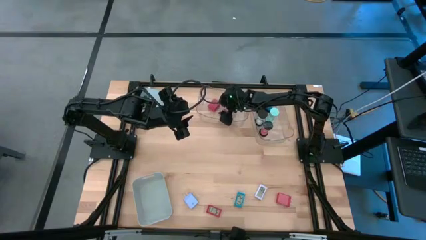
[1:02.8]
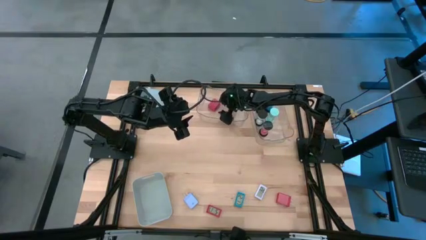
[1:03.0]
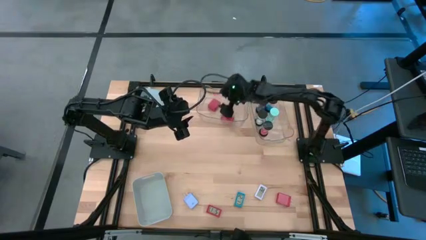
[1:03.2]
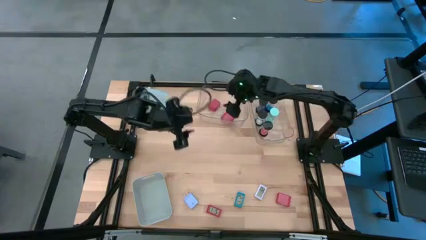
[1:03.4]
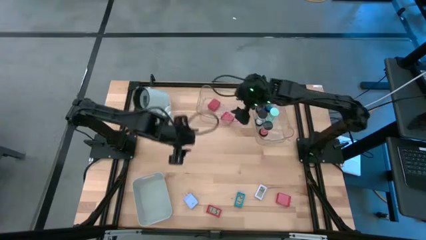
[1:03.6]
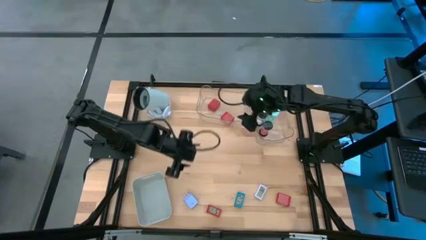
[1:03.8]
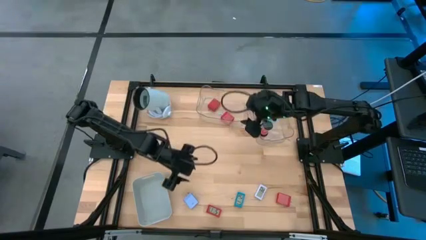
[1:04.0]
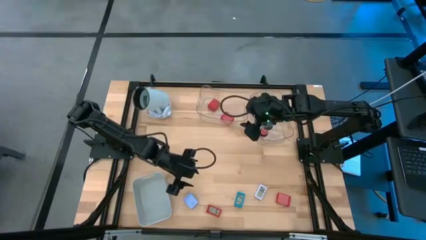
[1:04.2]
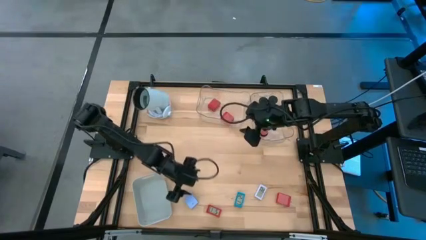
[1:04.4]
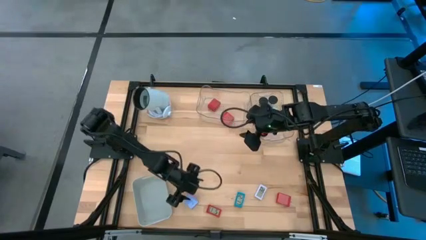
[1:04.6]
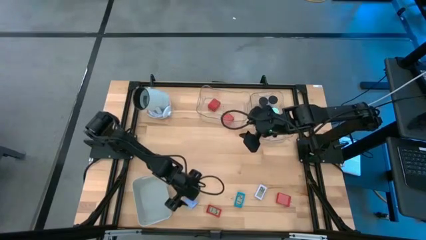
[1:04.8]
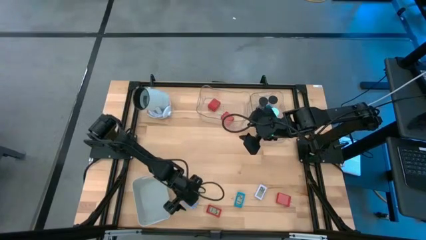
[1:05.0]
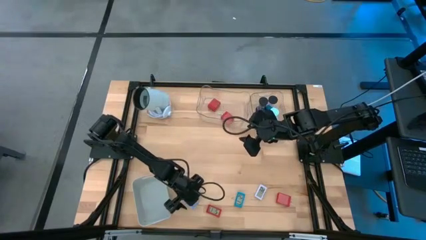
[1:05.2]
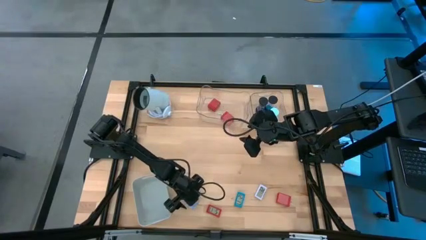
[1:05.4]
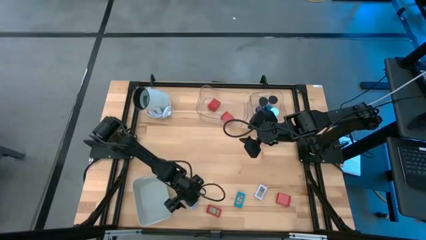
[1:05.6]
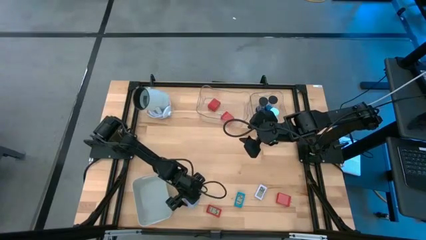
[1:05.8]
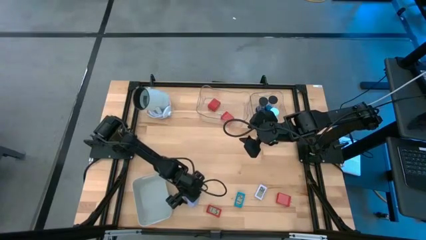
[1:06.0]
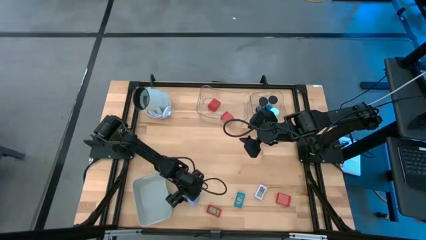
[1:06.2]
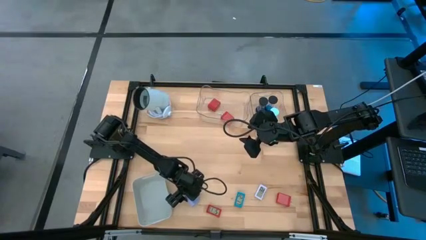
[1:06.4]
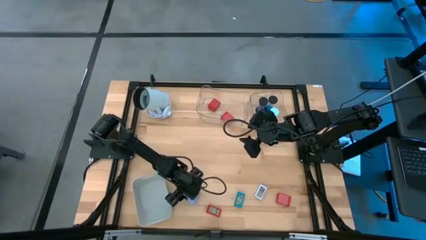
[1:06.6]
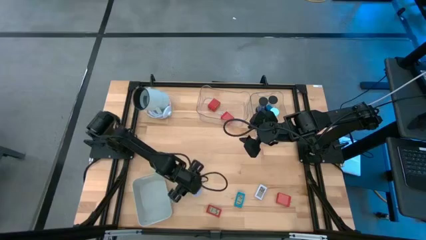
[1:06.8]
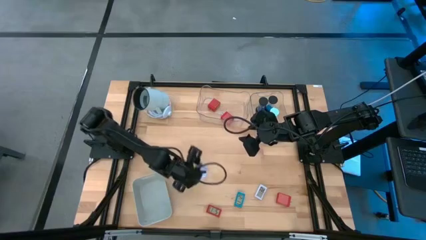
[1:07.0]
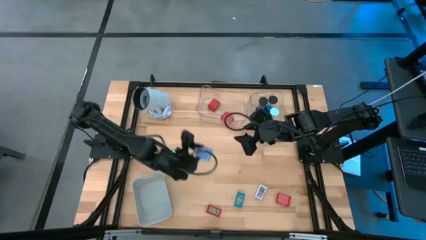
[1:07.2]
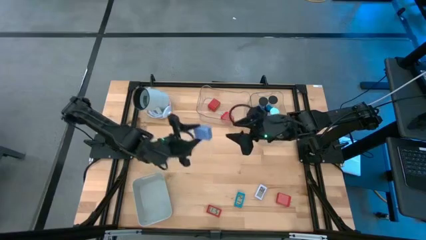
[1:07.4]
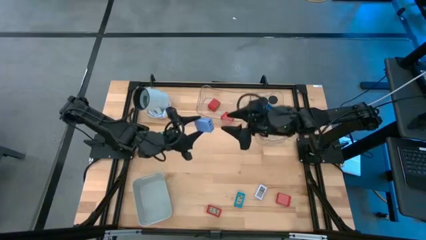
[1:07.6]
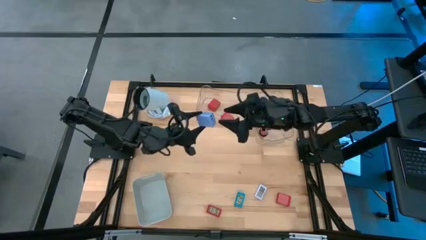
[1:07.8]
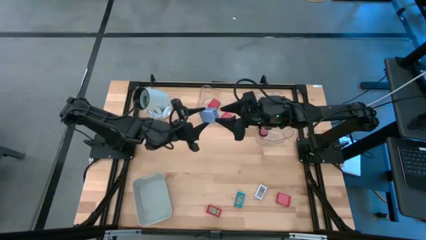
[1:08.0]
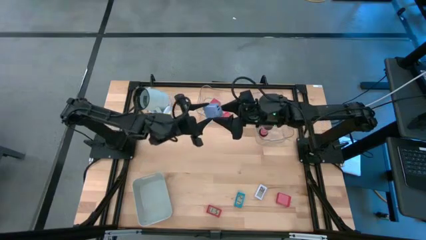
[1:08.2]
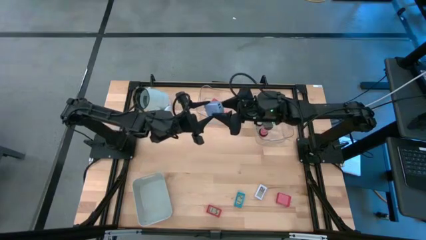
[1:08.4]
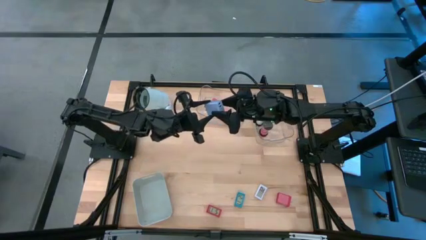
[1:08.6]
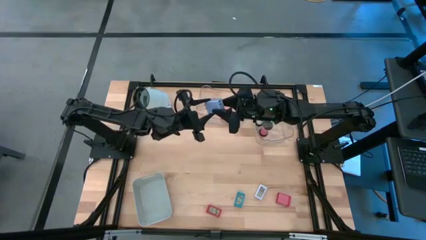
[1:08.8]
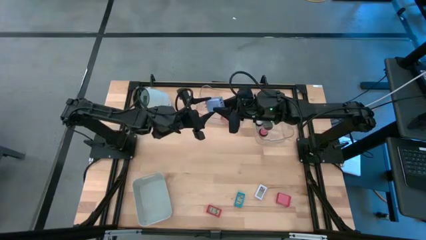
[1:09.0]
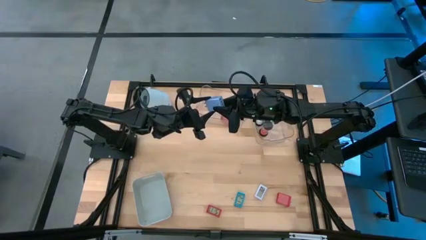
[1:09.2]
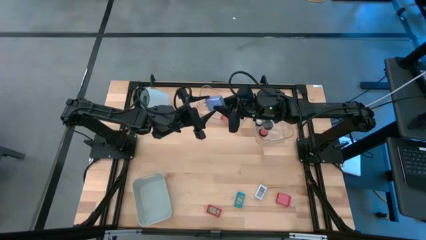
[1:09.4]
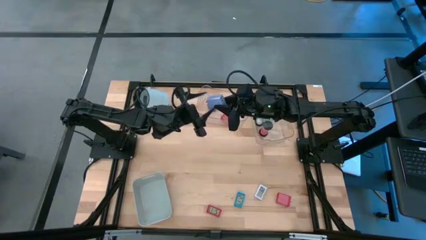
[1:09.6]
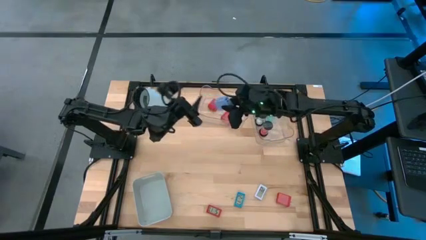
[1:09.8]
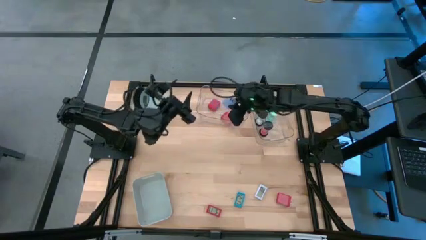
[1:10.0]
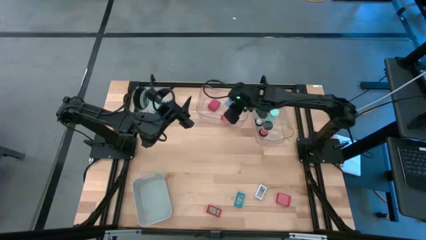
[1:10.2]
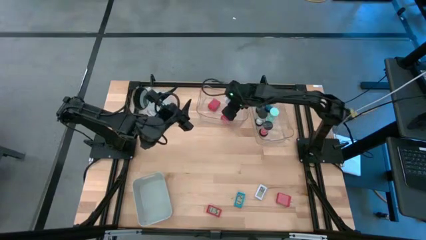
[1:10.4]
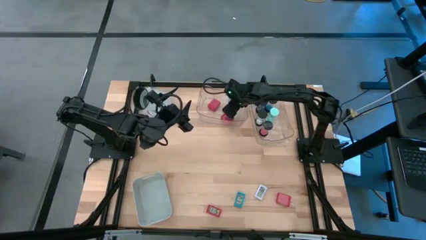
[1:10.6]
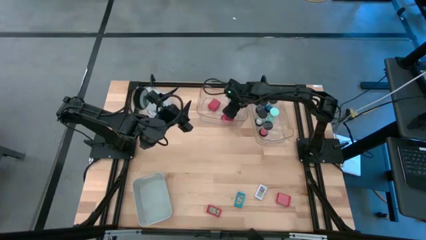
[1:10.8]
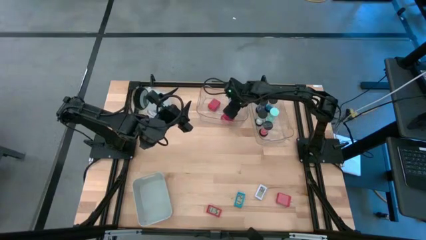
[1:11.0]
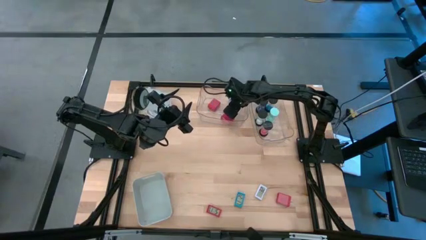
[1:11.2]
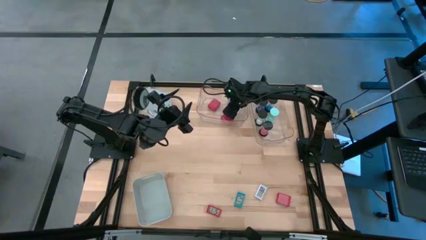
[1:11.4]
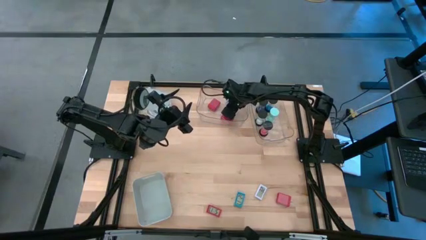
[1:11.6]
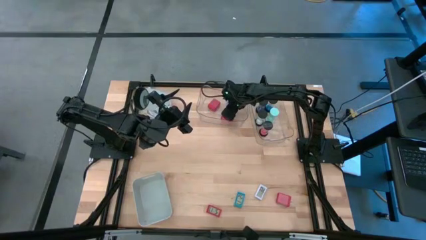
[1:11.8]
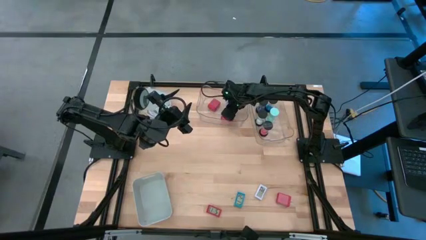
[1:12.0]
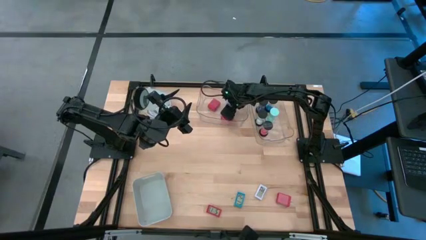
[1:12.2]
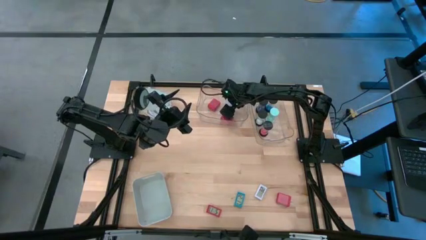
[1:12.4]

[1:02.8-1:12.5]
Task: Pick & Place Office items
Put the blue charger adapter into the left transparent bin

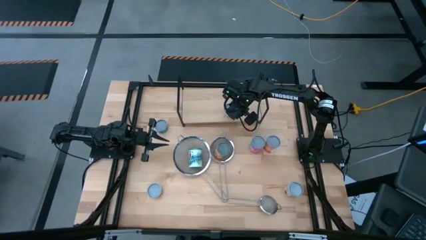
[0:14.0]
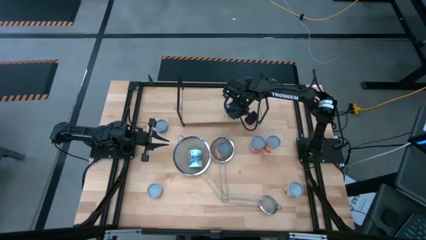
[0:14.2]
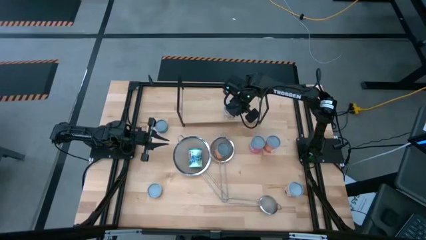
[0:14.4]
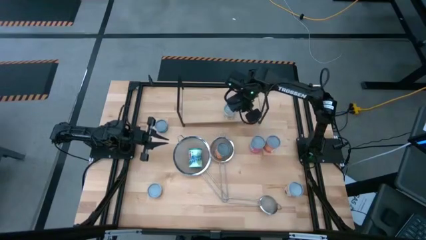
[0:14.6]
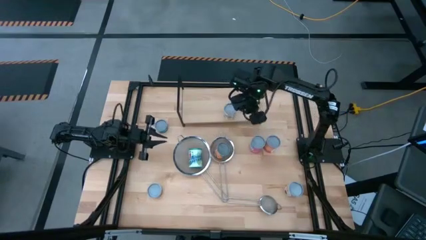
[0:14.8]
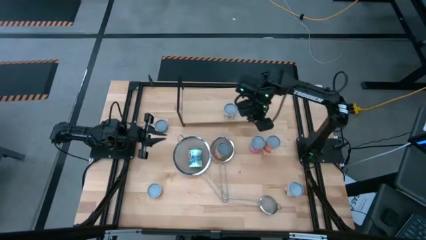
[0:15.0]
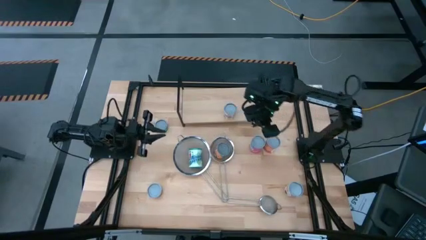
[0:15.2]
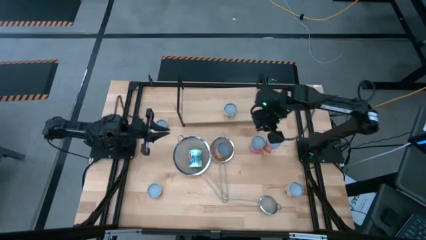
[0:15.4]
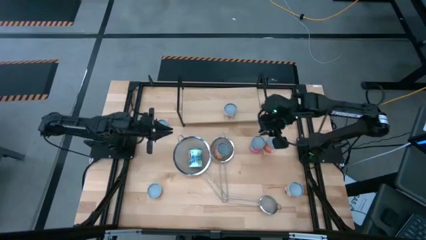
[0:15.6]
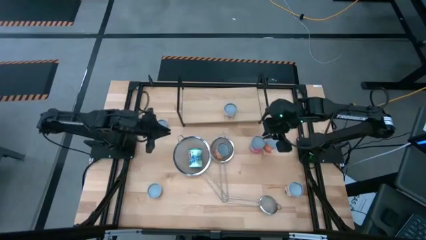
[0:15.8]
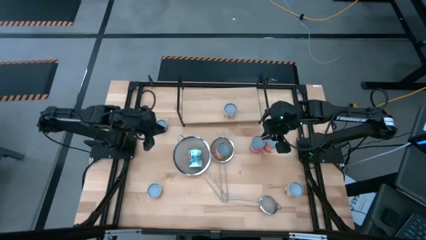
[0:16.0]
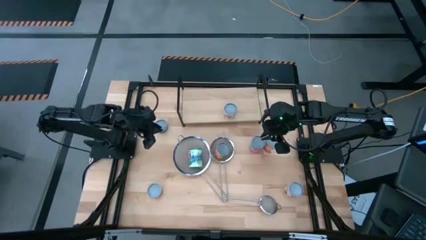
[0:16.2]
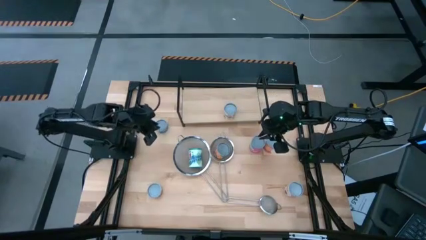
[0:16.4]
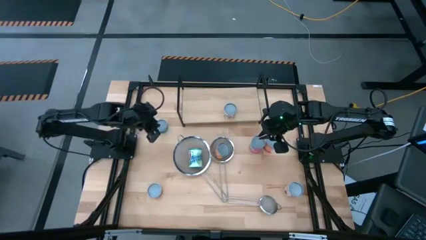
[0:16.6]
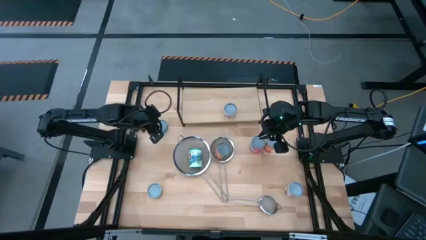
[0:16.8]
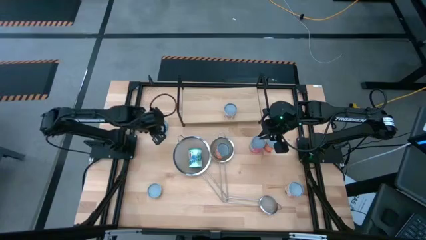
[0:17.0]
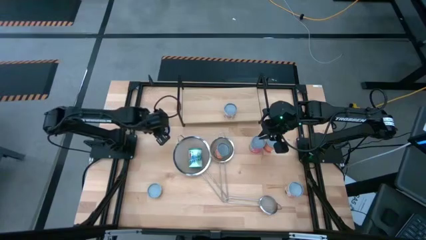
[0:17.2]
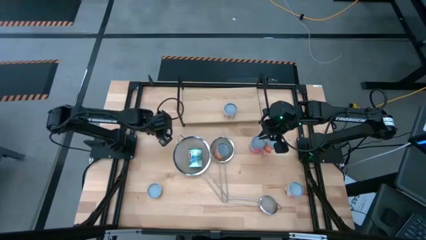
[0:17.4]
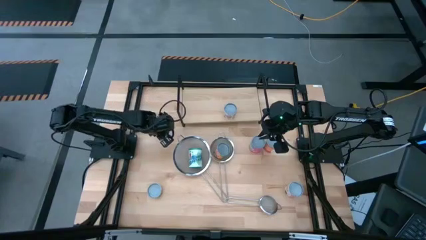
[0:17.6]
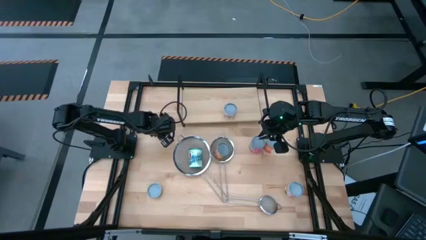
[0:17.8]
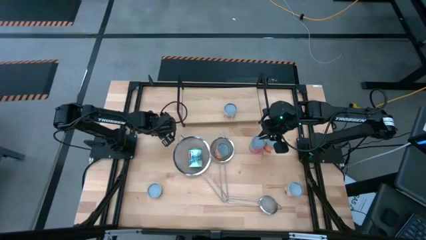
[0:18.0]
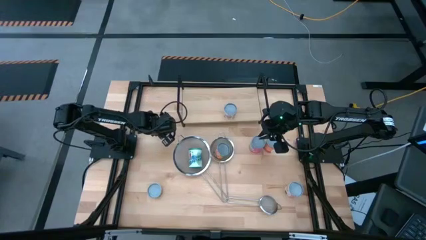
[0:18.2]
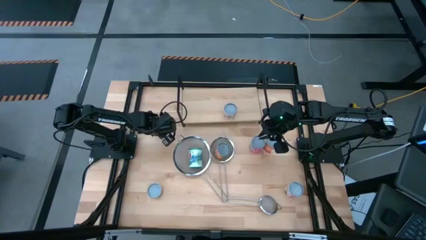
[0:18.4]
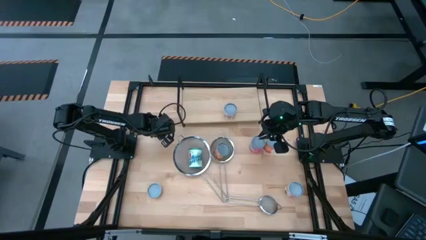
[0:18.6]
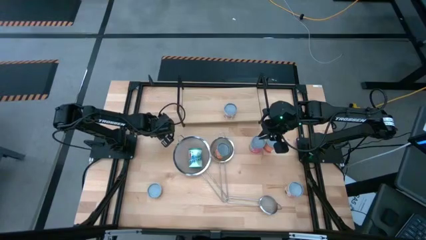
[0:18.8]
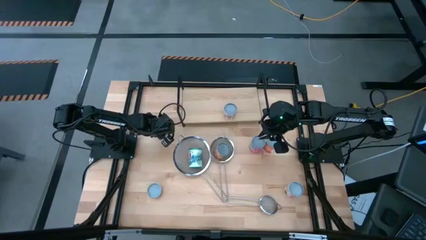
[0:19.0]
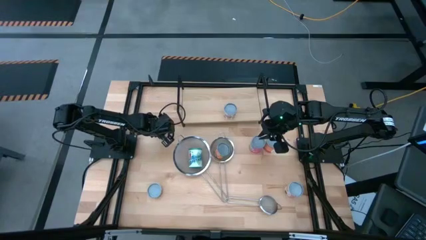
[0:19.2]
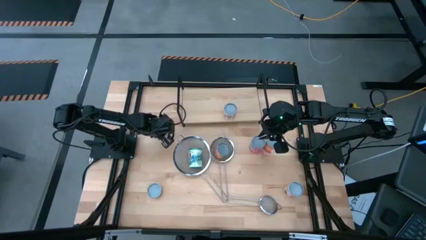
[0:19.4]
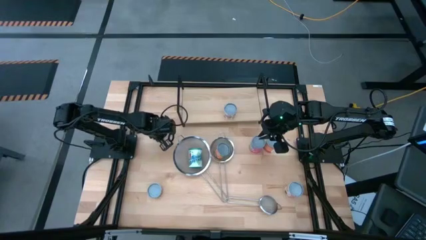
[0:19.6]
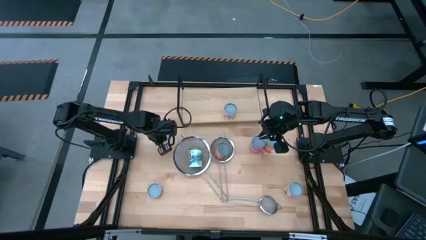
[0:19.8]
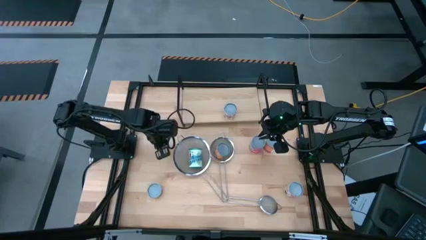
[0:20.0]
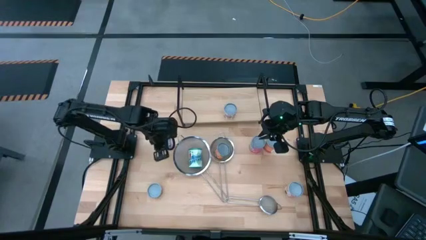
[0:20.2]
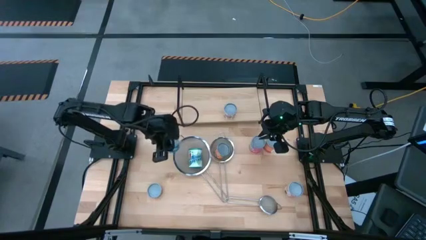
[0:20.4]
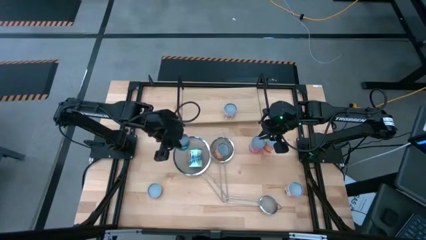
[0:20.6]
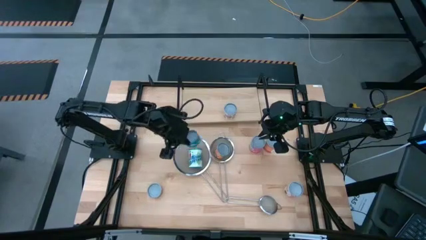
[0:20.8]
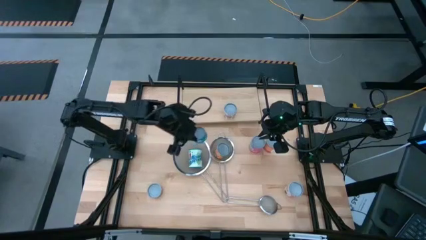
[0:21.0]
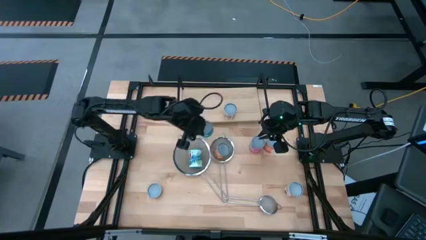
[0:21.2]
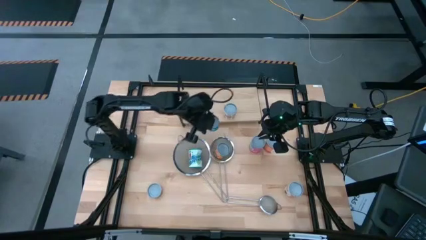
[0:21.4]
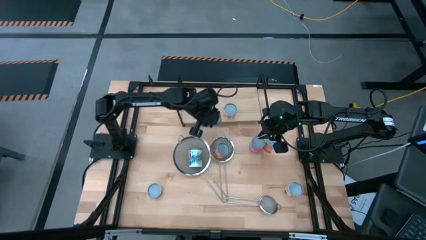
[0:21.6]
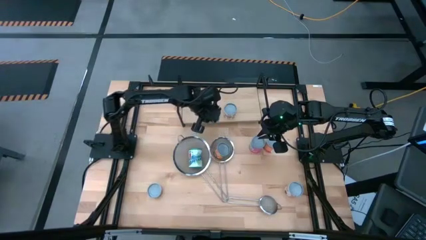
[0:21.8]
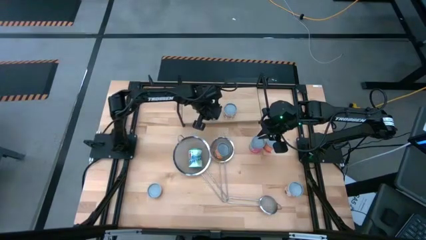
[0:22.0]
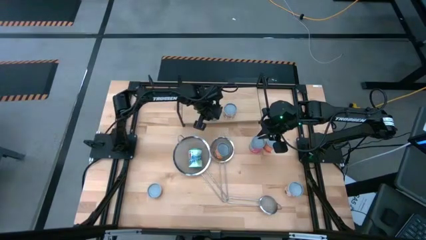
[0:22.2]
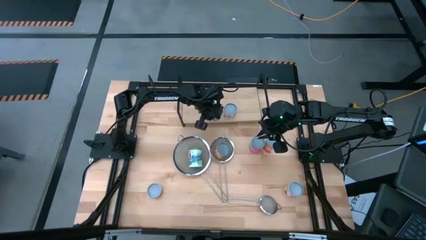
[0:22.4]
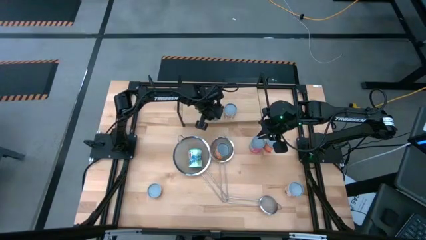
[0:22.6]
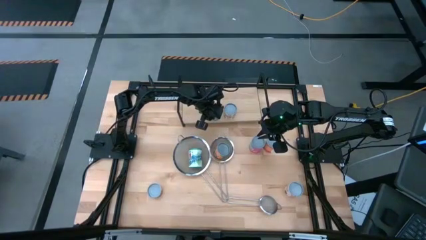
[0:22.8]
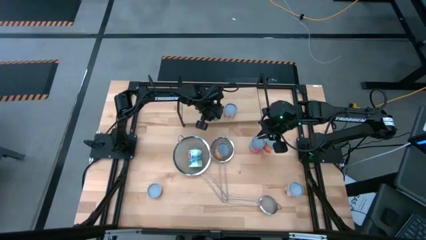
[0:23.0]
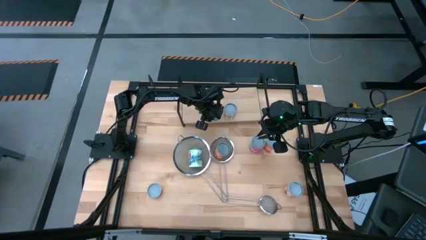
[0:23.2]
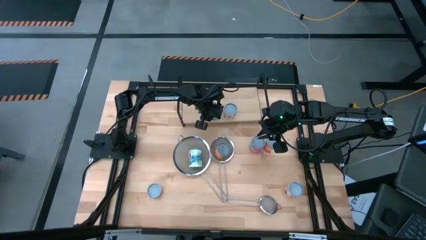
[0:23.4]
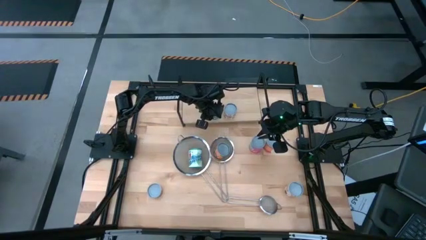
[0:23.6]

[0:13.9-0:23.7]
Task: Pick and place cans onto a shelf
Put the canned tuna on the shelf
